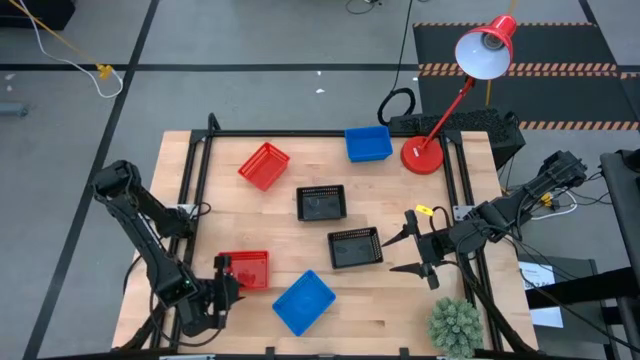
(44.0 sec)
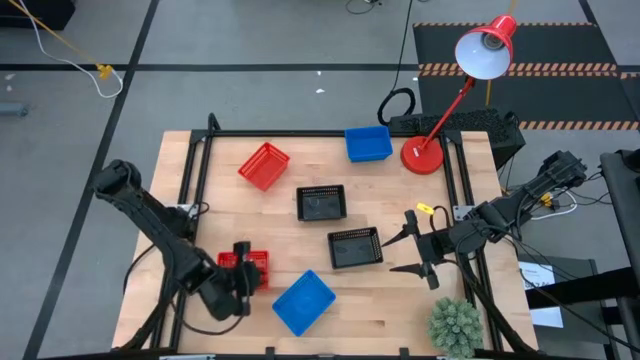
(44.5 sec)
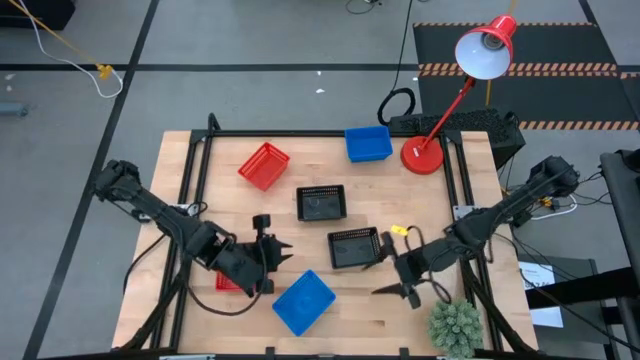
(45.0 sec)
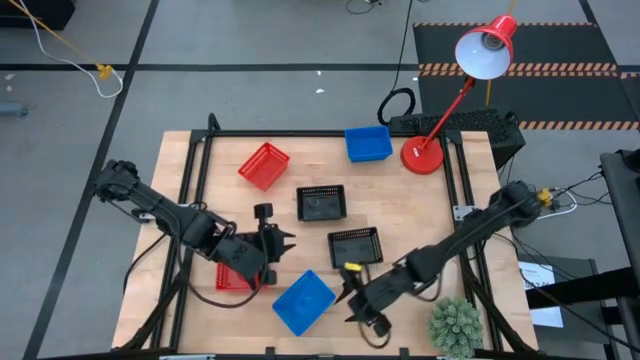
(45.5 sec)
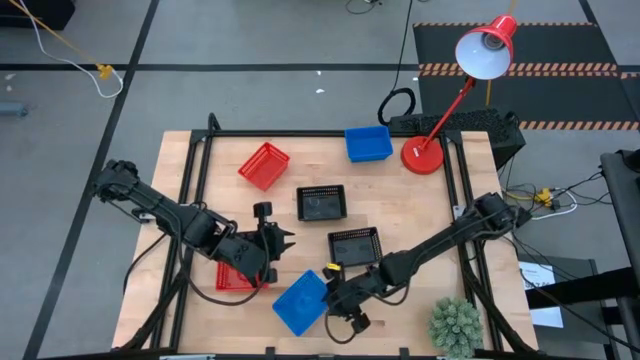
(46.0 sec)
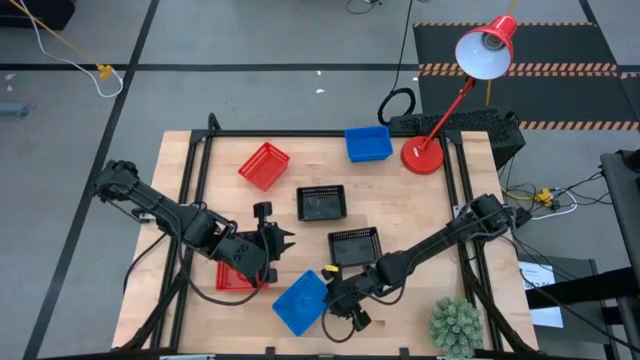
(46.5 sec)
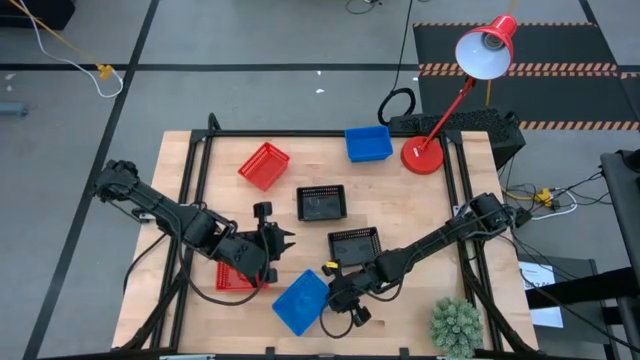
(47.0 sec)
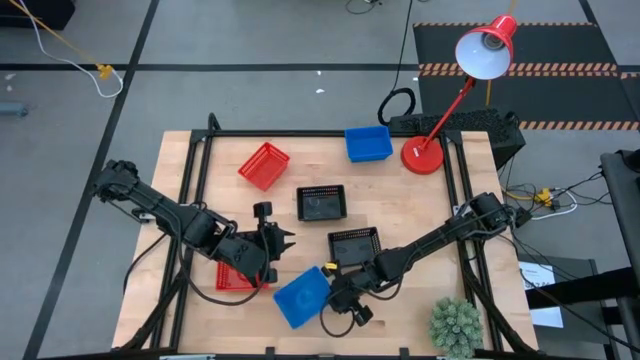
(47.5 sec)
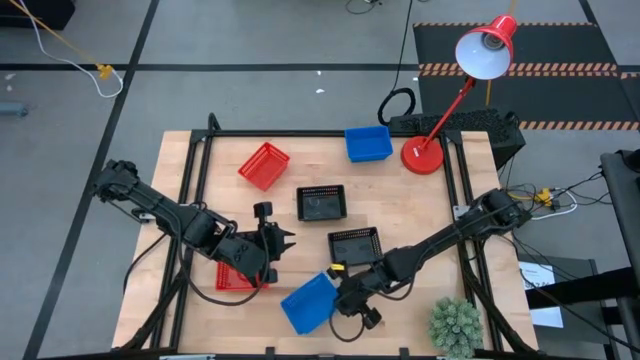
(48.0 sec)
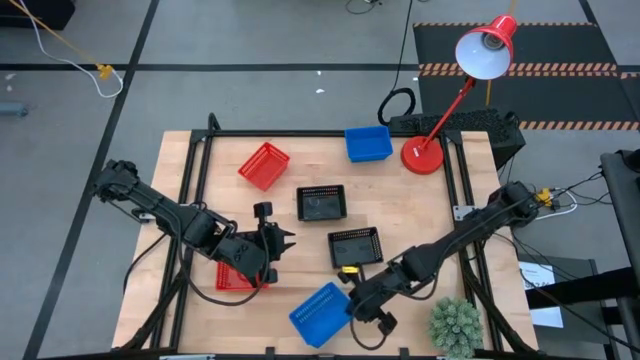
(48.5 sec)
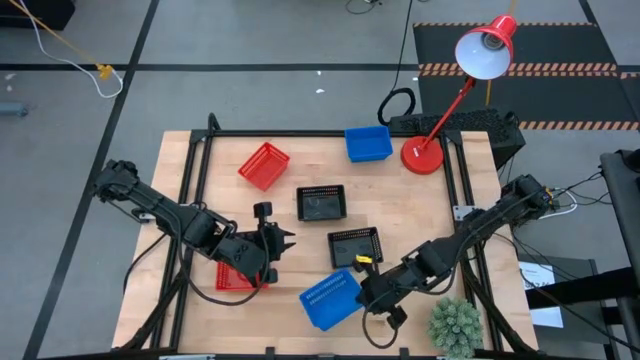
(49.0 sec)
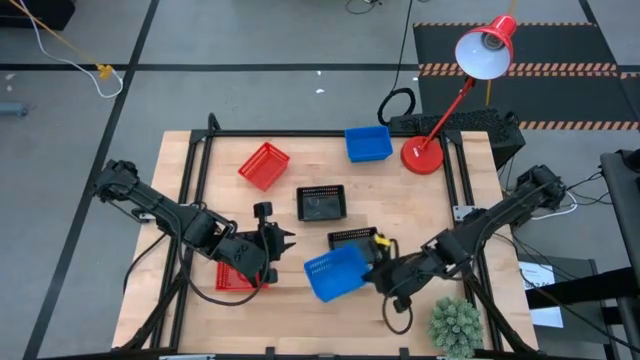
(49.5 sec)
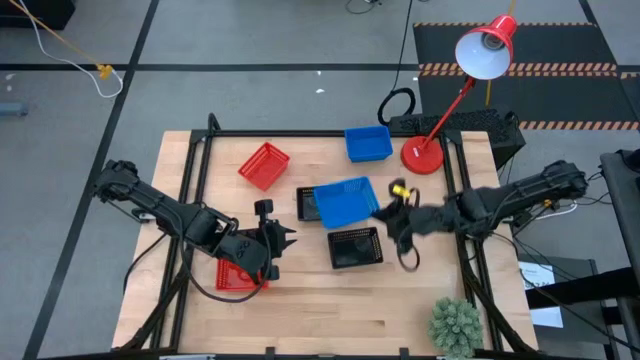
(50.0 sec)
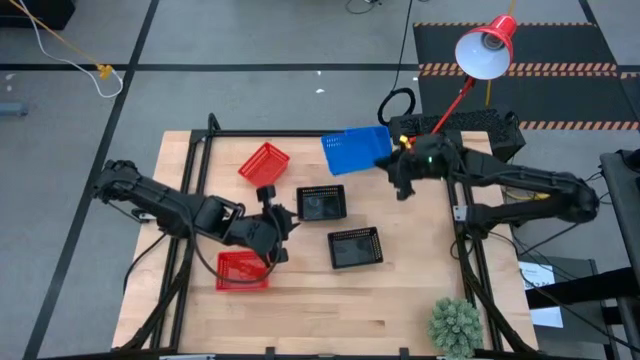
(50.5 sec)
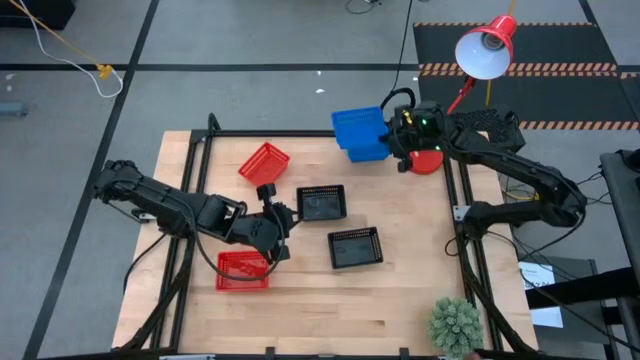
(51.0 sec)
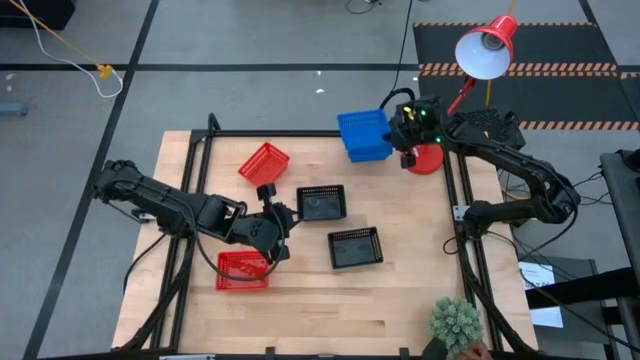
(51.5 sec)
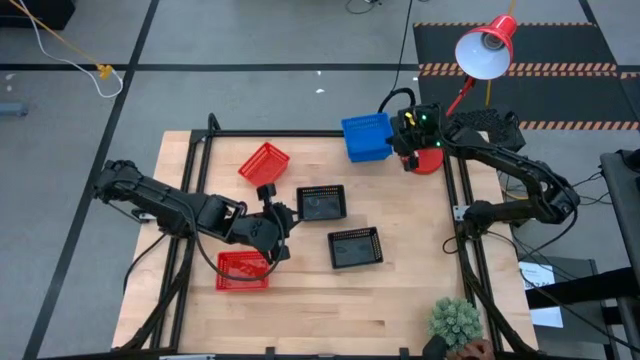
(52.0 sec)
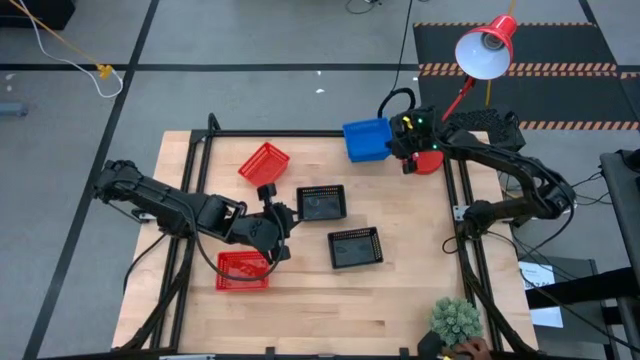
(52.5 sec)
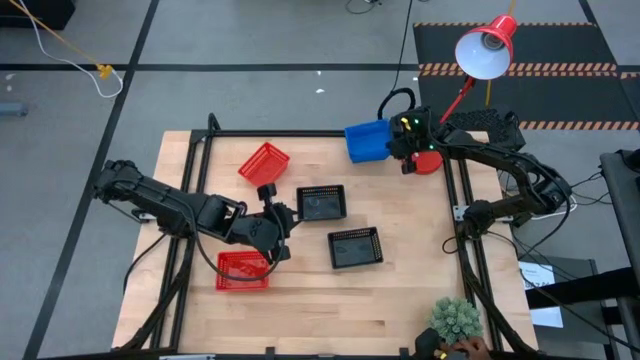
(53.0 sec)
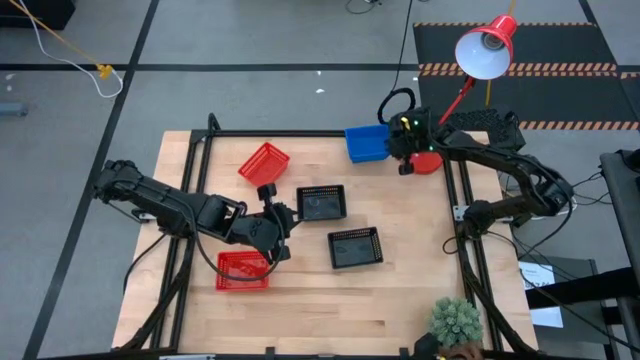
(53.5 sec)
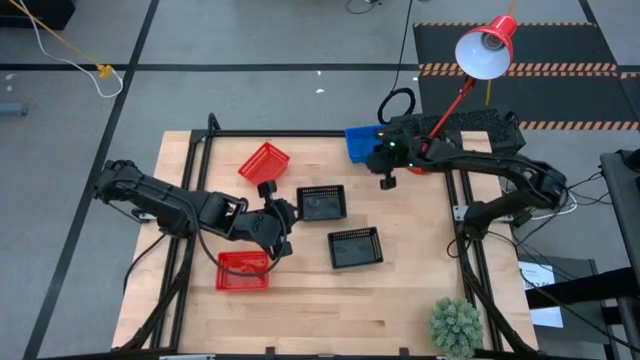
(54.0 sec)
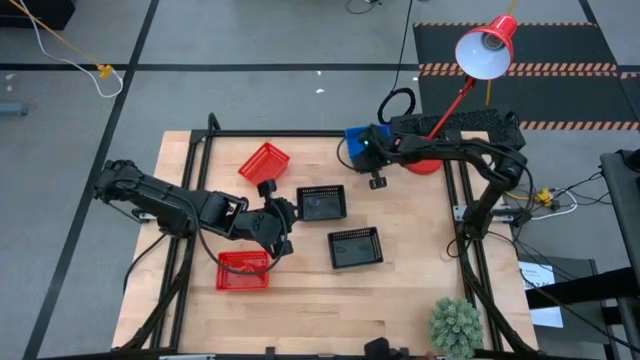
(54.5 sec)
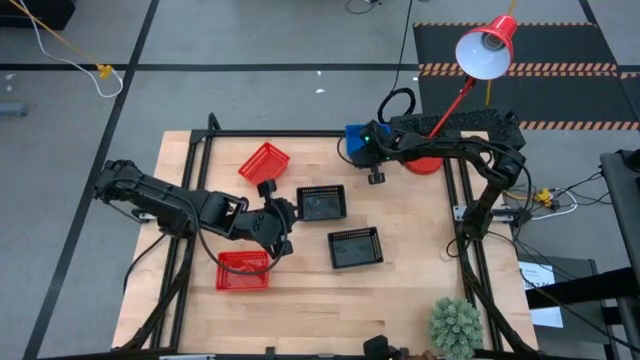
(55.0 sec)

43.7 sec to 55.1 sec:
Stack the bottom blue basket on the stacked blue baskets

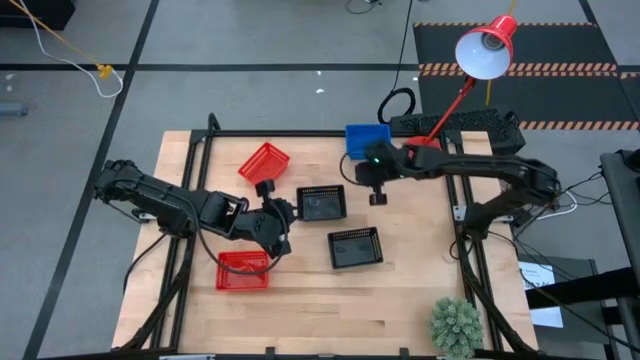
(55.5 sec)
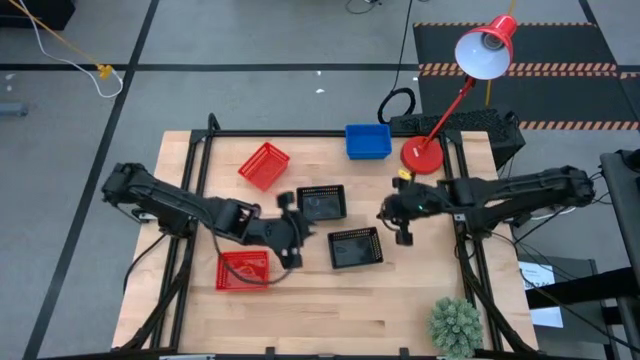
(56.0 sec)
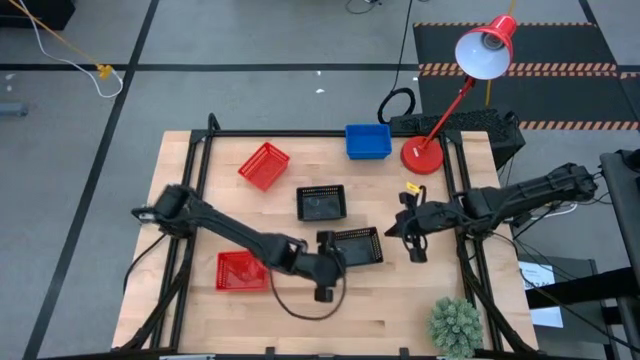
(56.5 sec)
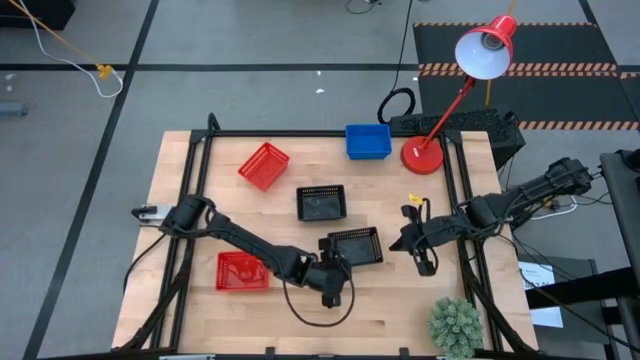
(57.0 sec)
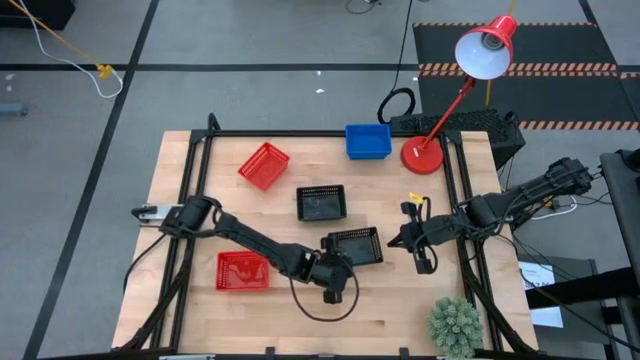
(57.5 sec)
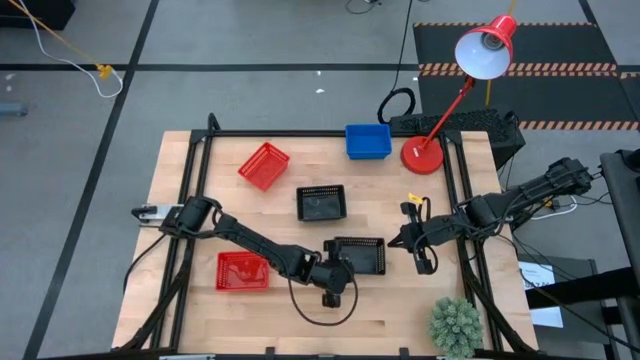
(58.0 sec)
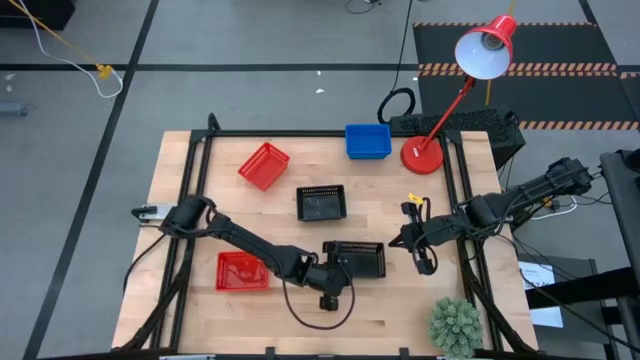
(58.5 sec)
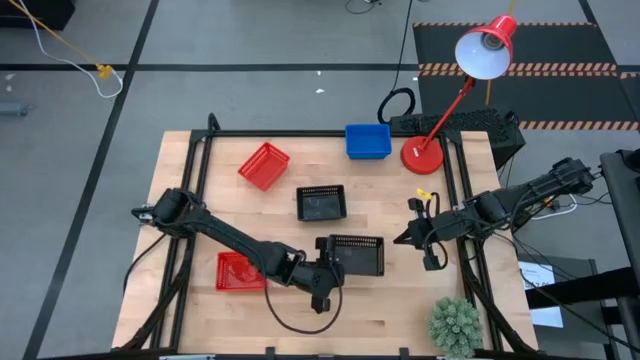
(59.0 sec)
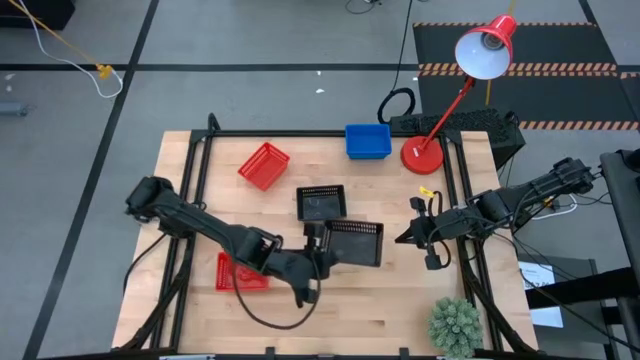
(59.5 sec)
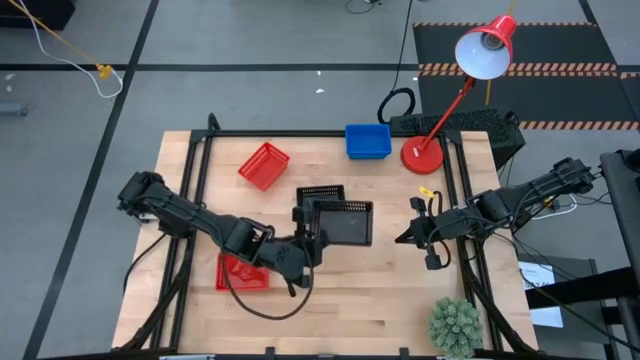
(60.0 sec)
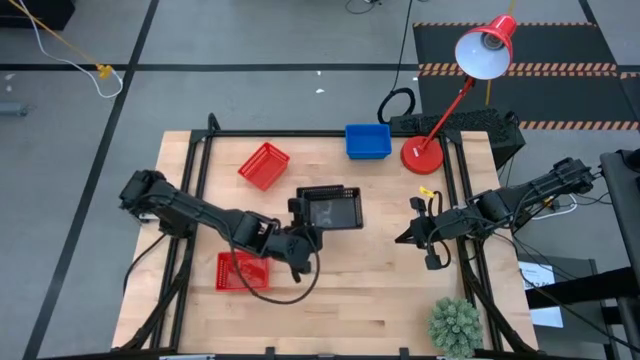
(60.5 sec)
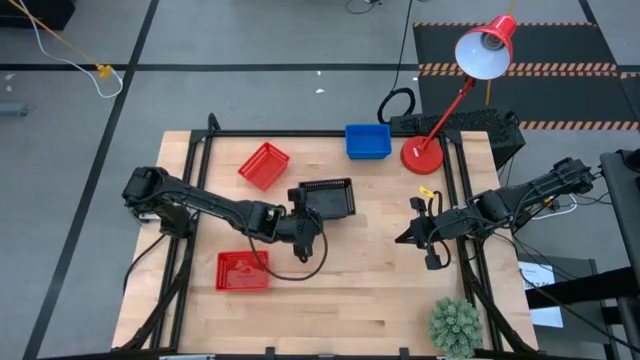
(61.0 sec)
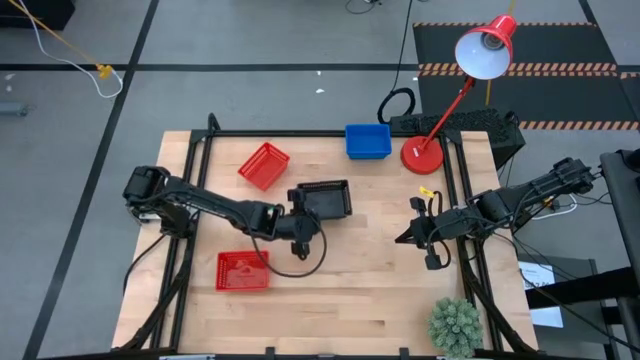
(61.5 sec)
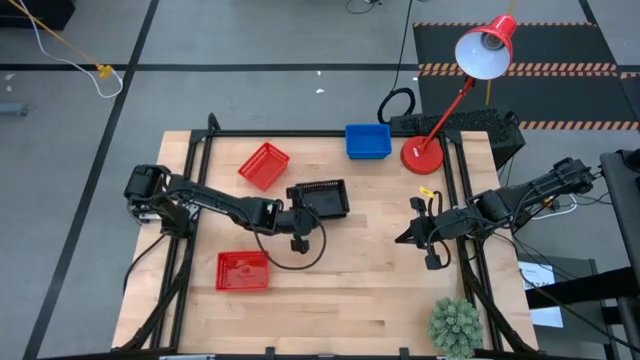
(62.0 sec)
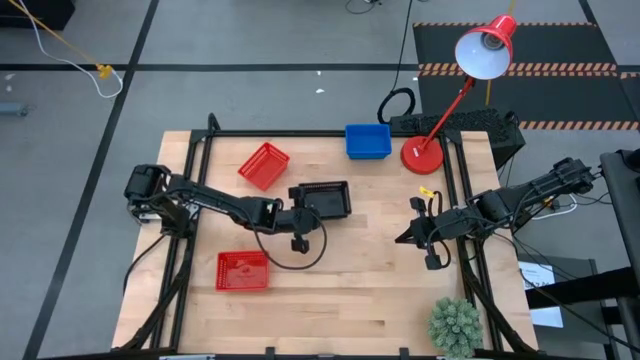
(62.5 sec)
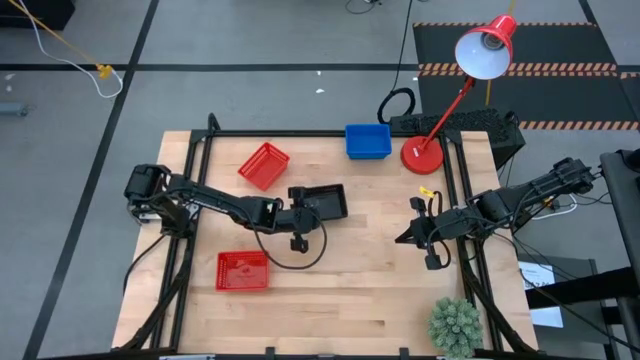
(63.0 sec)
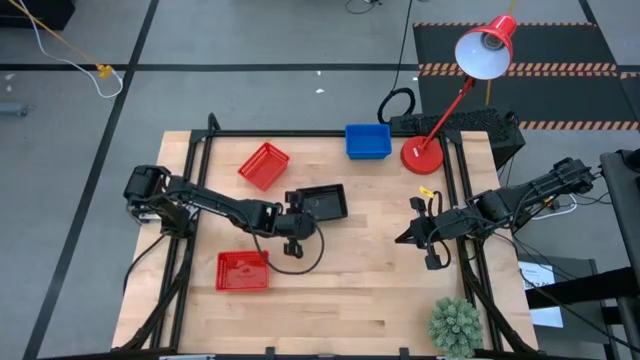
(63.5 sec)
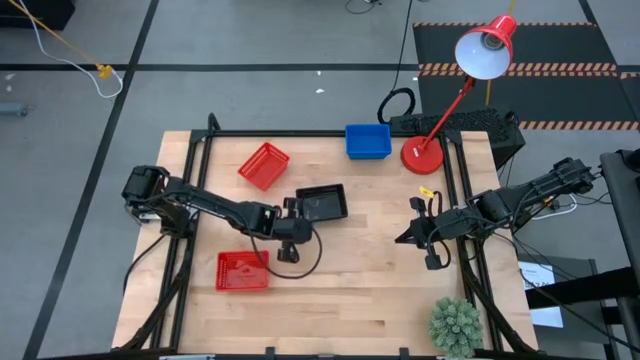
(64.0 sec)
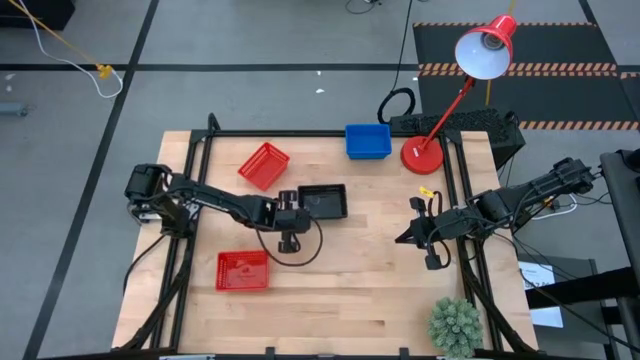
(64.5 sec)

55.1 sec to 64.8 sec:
Stack the bottom black basket on the stacked black baskets
